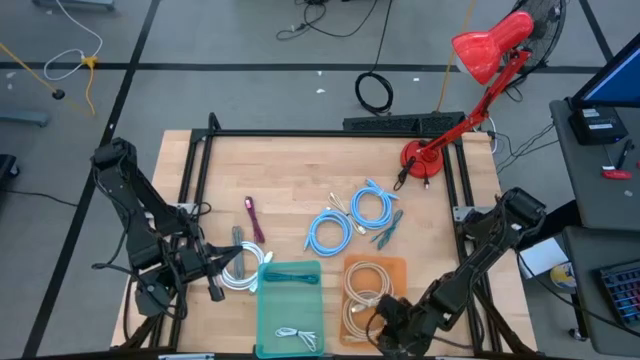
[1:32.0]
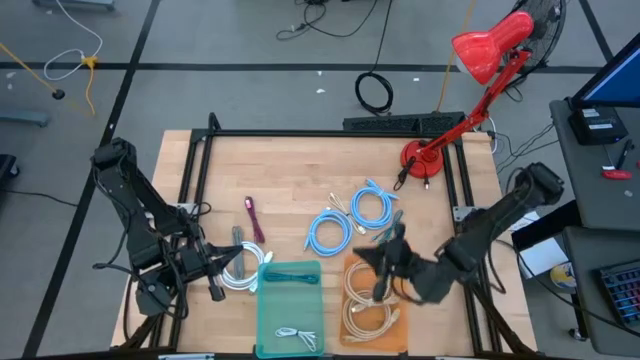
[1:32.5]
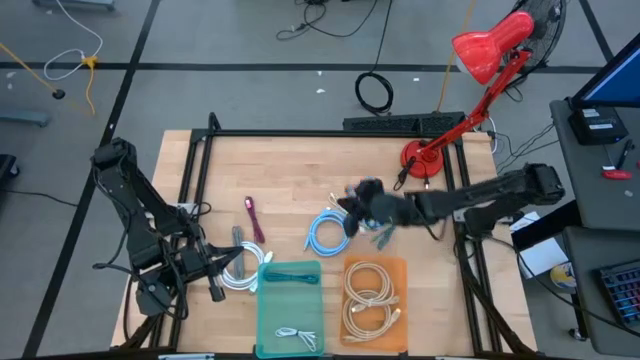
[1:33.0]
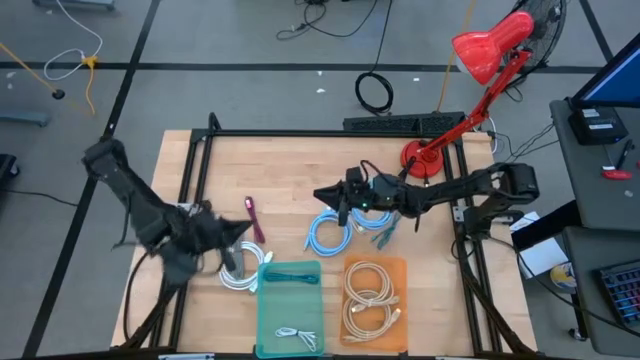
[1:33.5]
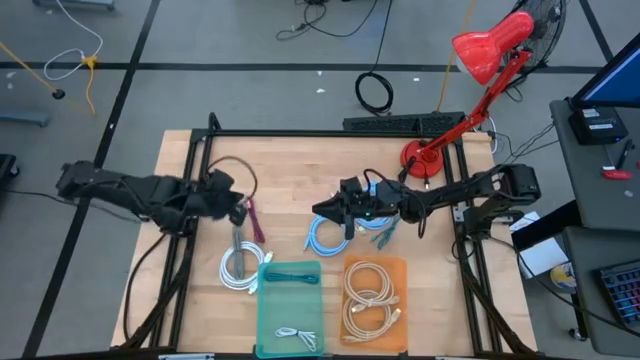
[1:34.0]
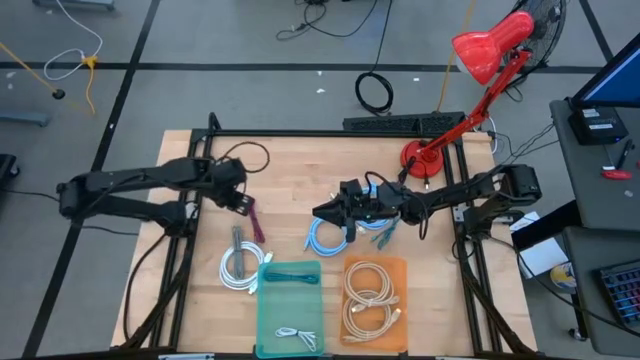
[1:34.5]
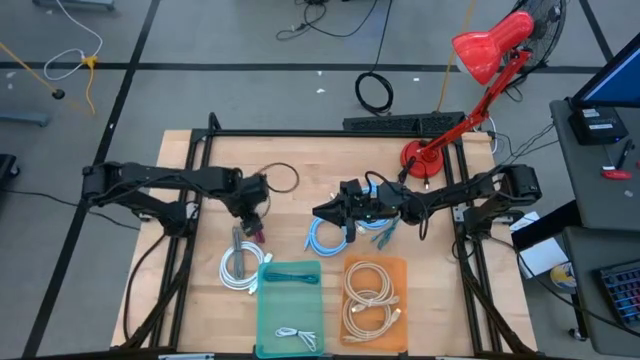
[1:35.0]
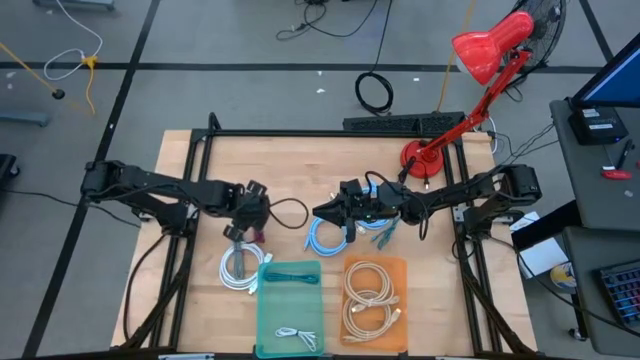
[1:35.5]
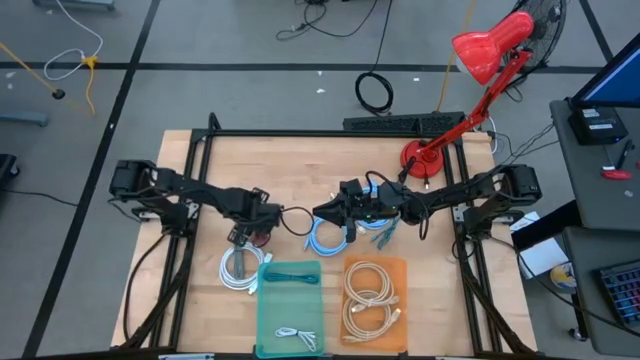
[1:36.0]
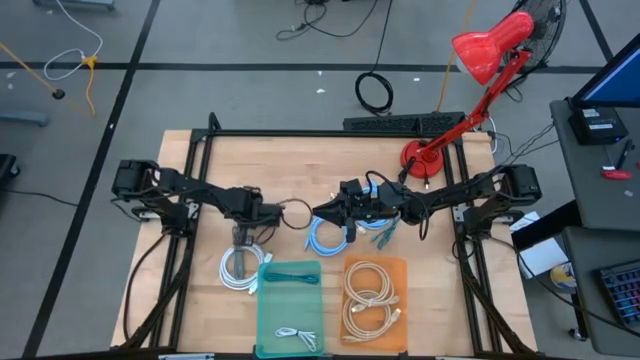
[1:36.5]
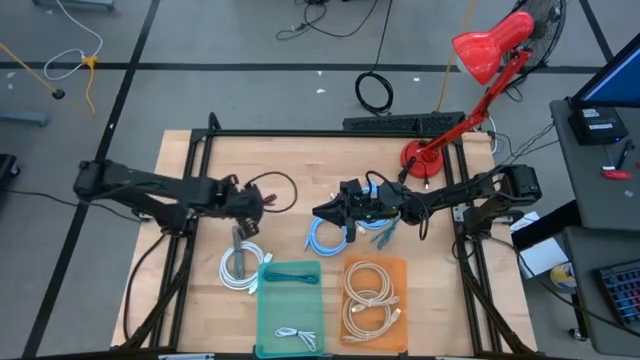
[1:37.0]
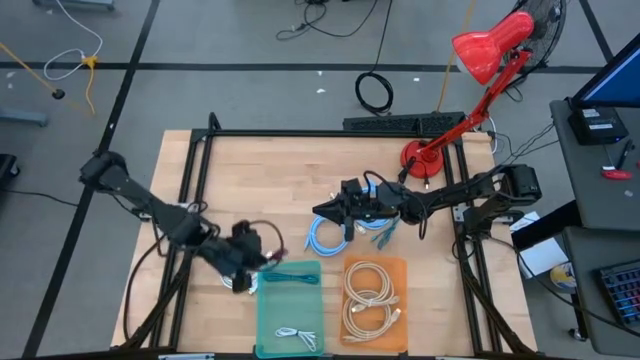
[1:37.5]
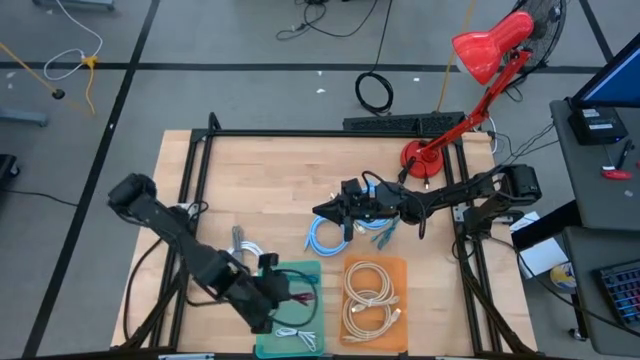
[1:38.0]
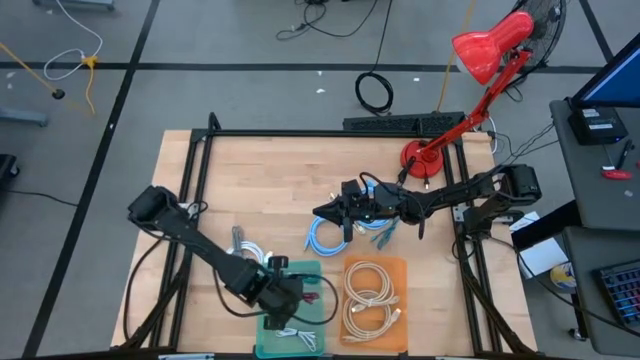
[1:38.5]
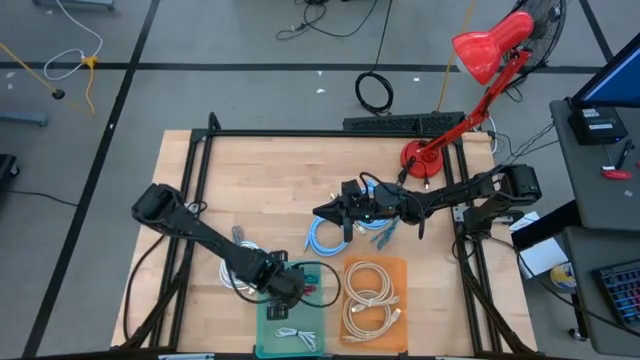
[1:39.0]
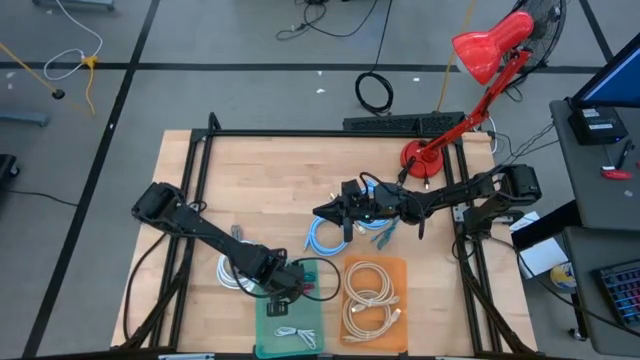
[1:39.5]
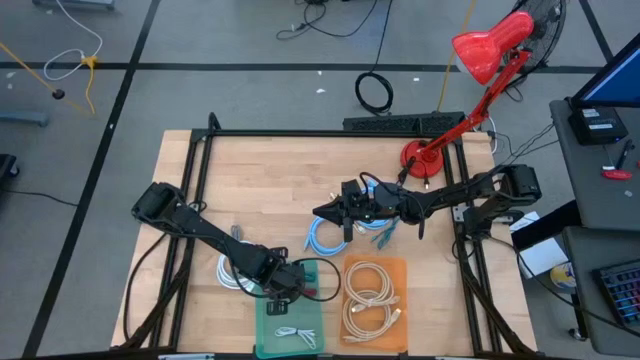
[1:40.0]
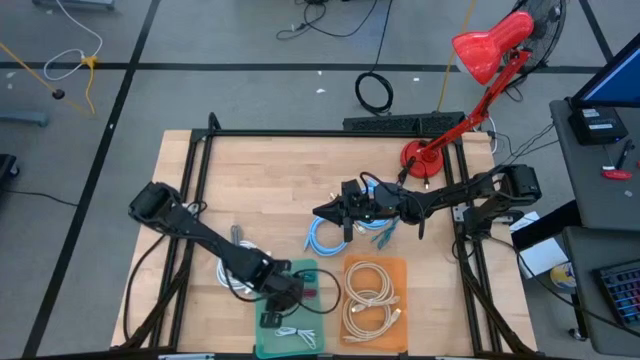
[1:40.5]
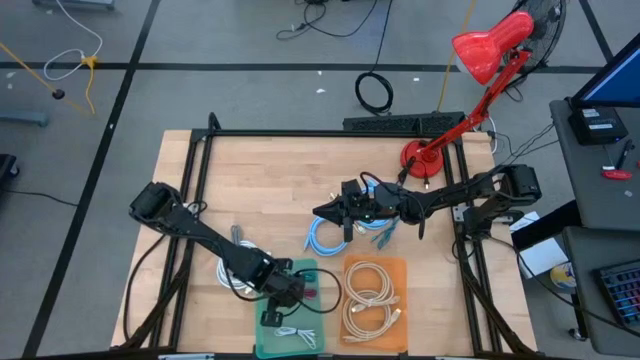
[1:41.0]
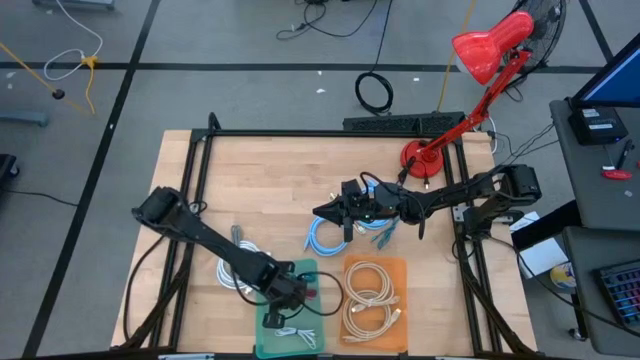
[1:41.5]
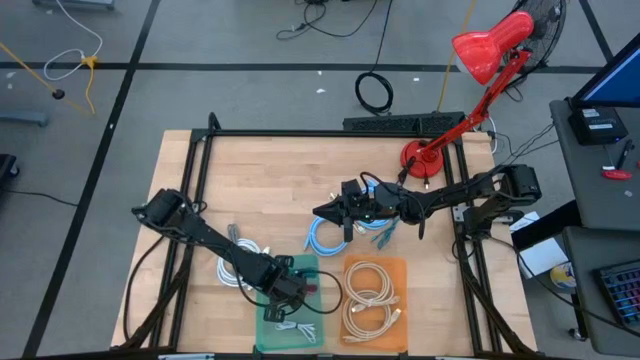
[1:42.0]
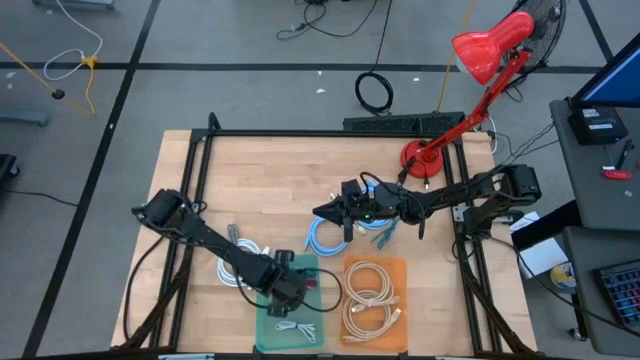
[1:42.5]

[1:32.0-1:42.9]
Task: Pick & Place USB Port
Put the pink charger cable into the green bin

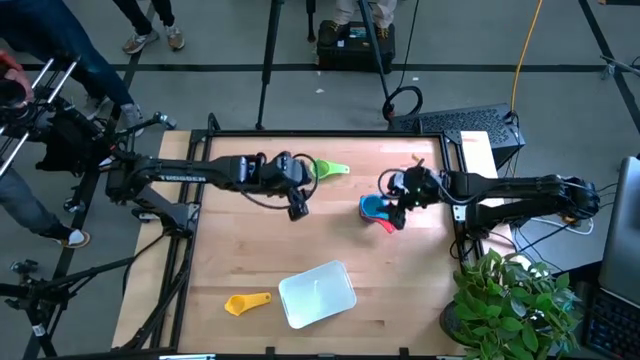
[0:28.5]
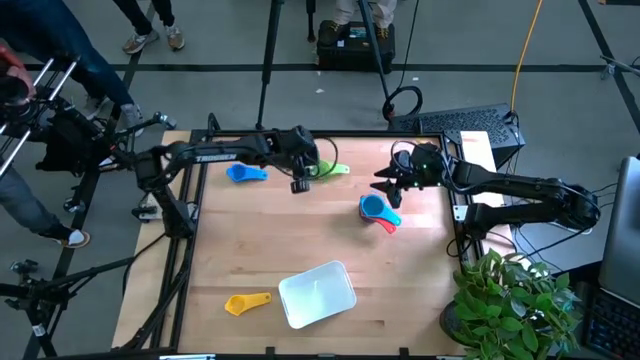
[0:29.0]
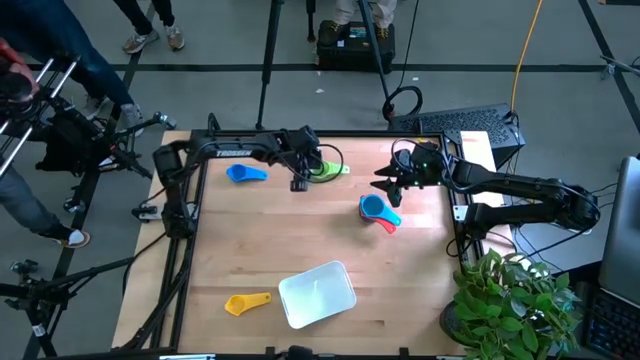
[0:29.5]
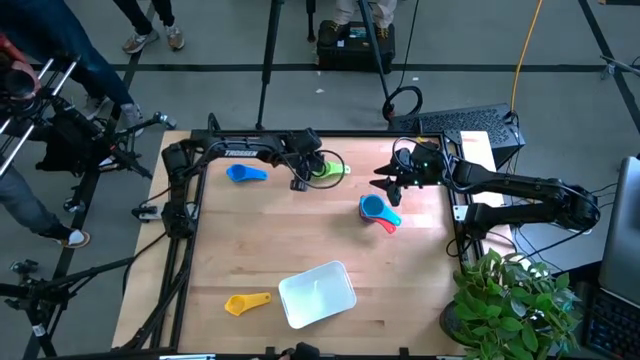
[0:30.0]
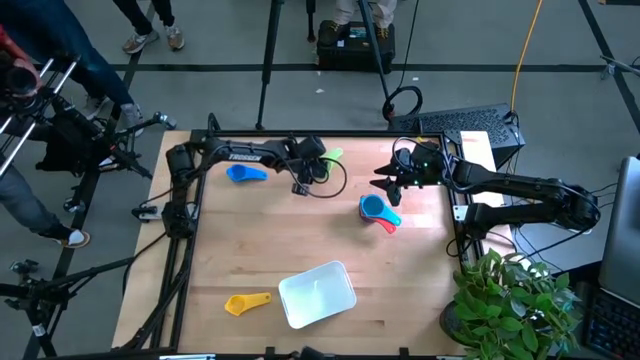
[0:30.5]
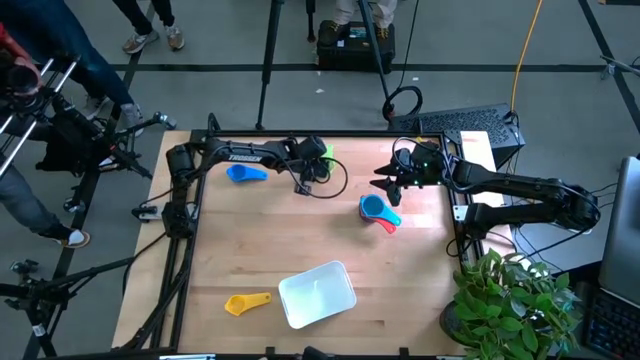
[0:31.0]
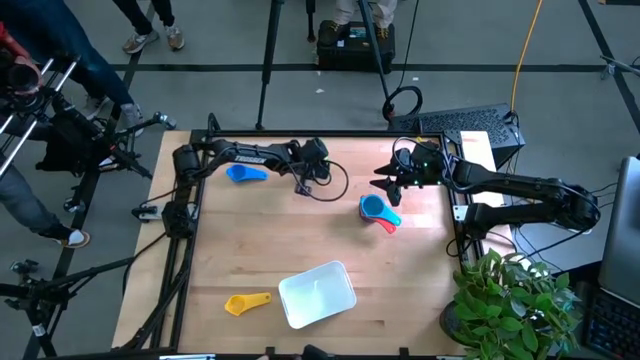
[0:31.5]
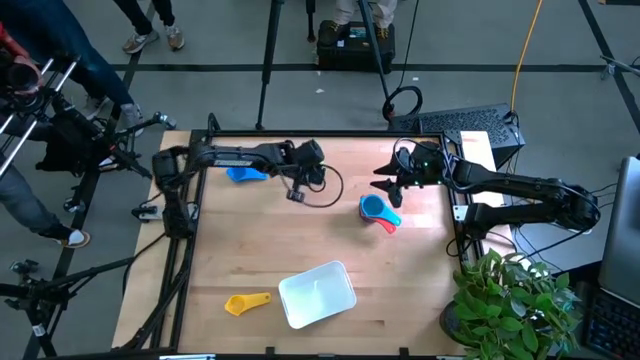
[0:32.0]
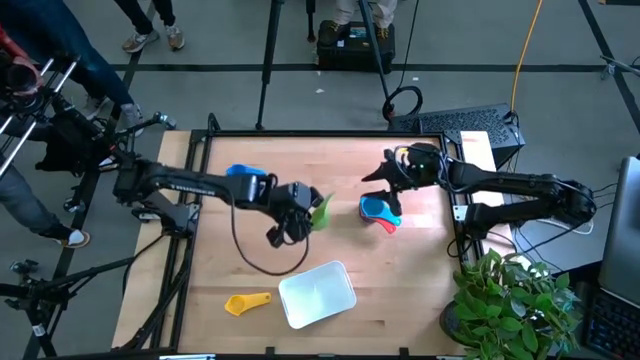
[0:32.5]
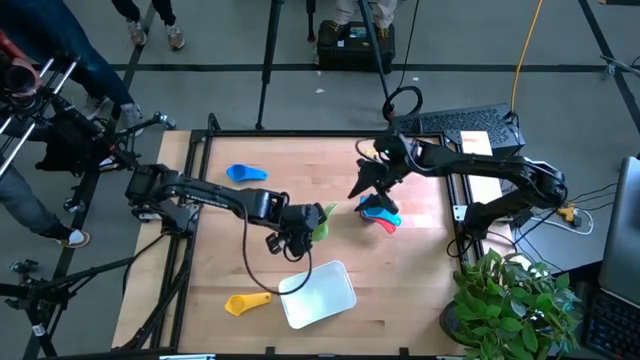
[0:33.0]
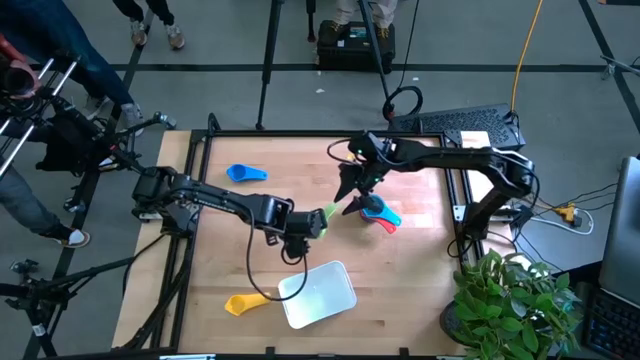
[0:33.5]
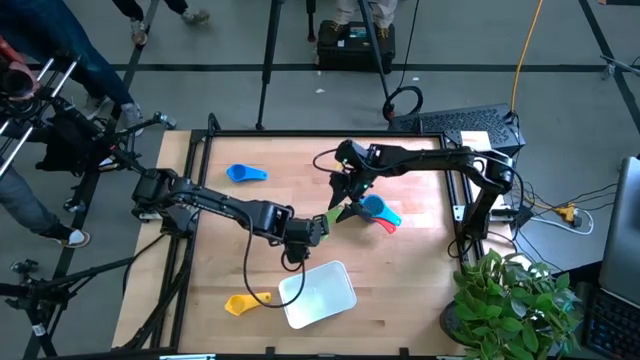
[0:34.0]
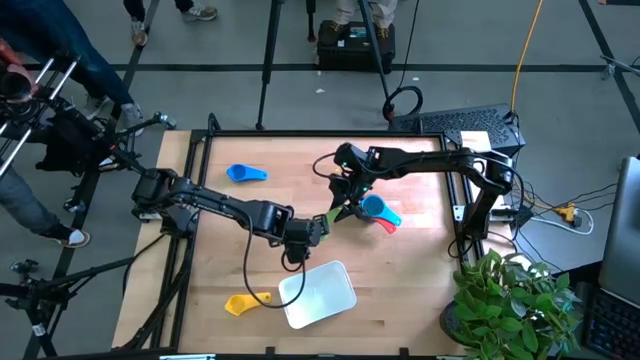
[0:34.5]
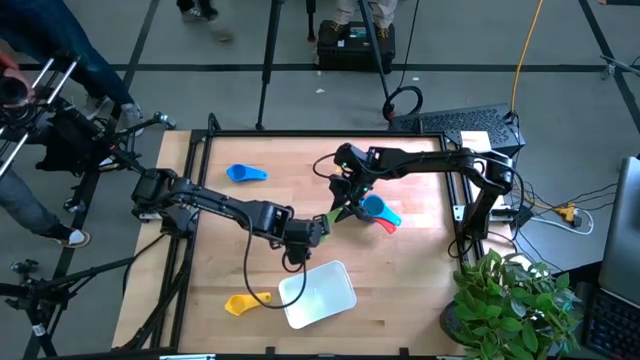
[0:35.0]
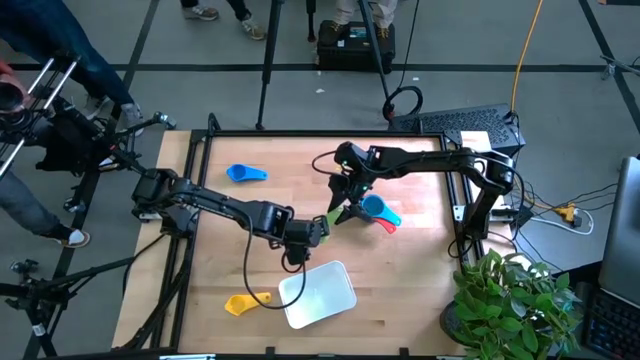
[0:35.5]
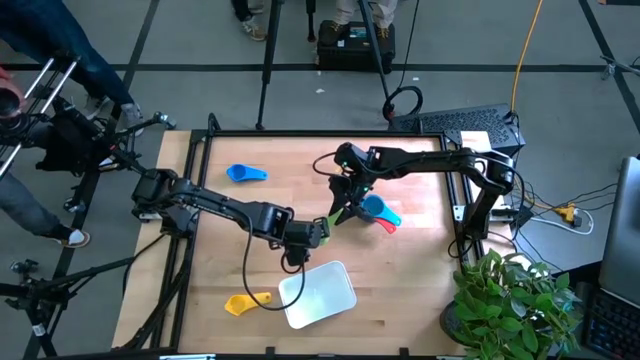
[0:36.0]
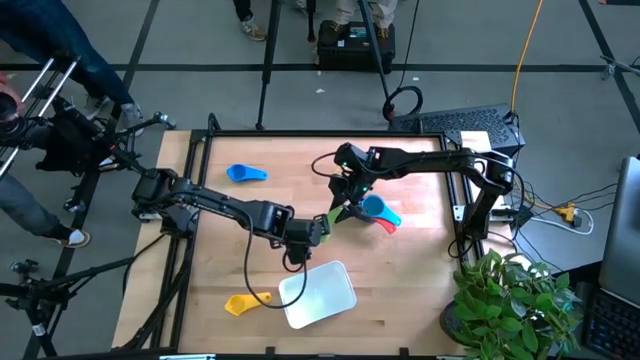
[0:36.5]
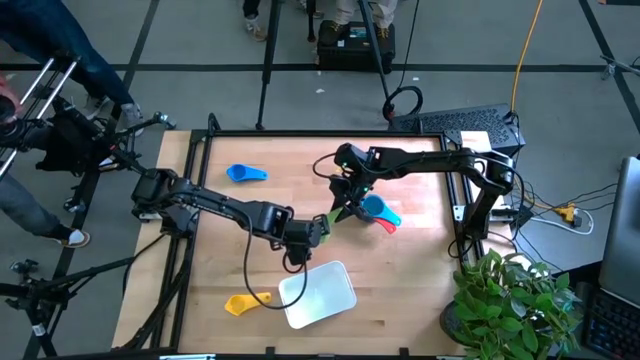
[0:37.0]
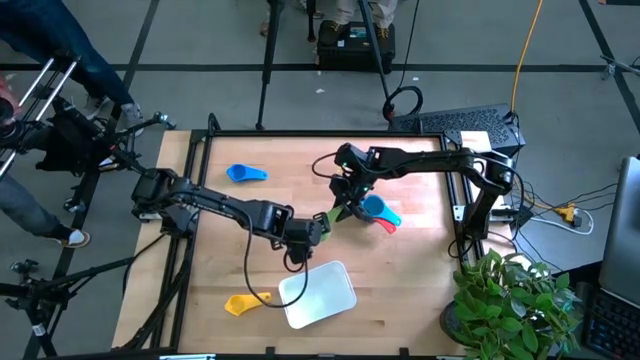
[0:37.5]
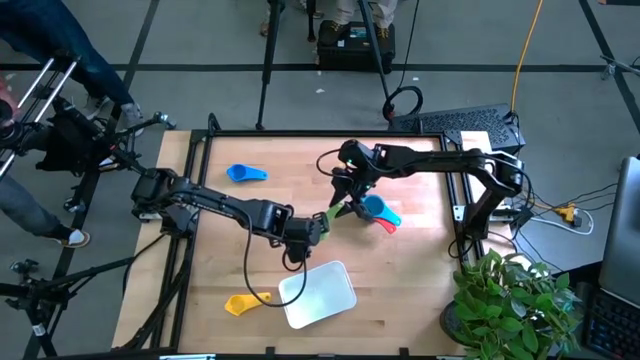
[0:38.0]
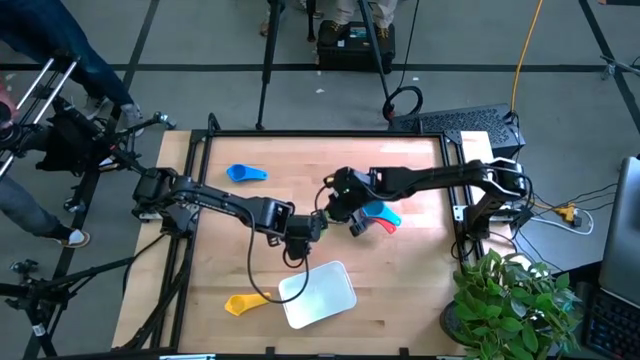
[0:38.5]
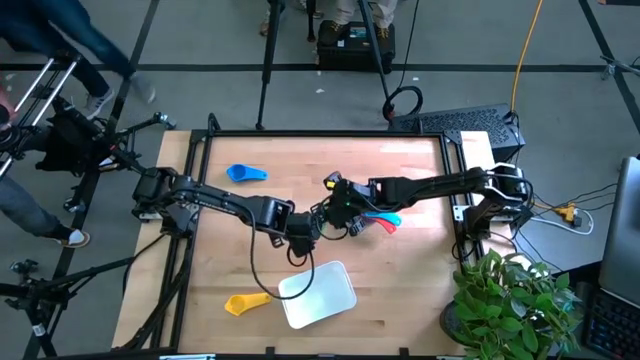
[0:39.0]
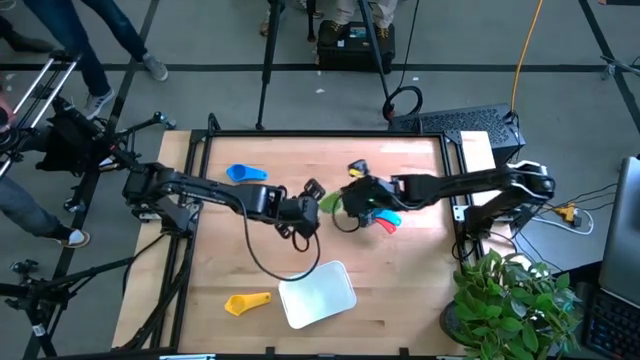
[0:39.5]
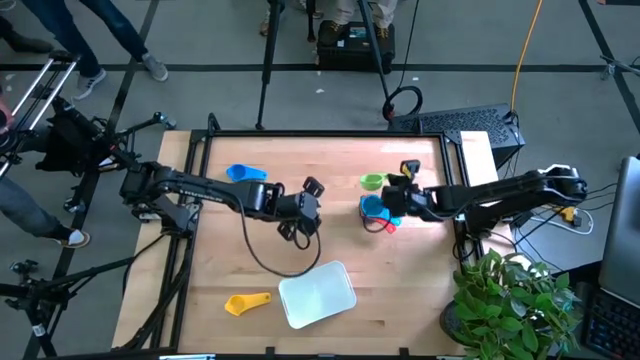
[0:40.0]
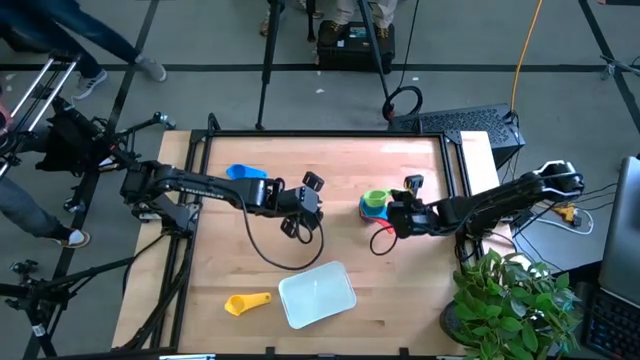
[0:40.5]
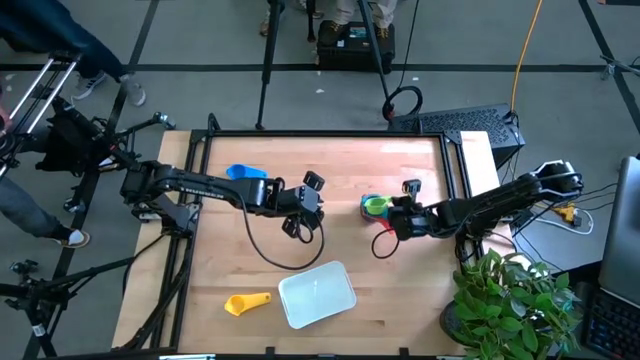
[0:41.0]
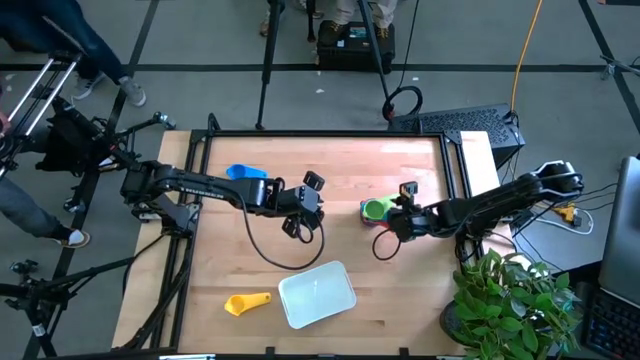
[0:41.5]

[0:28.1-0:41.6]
Task: Nest measuring cups in basket
Stack the green measuring cup on the light blue measuring cup
